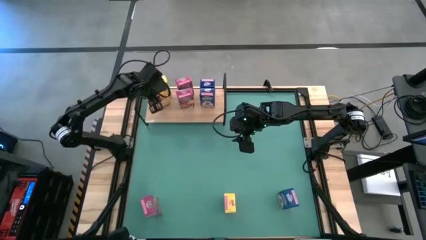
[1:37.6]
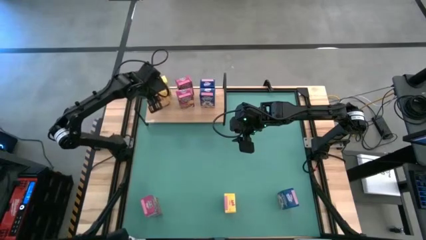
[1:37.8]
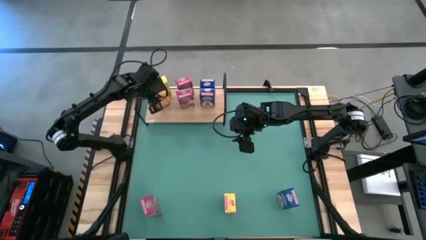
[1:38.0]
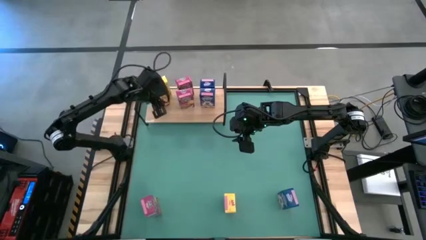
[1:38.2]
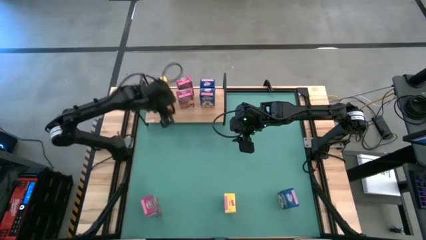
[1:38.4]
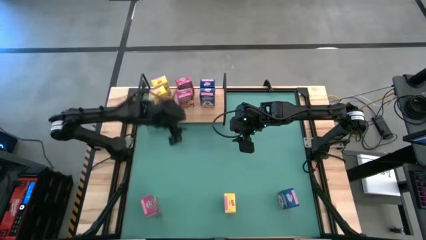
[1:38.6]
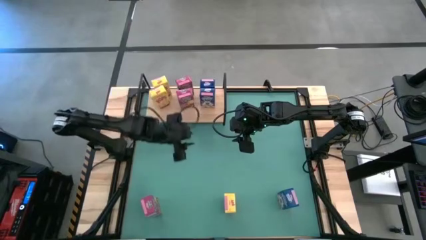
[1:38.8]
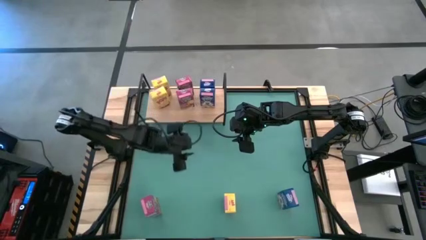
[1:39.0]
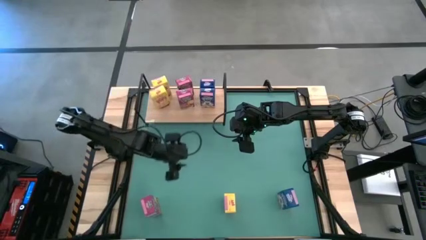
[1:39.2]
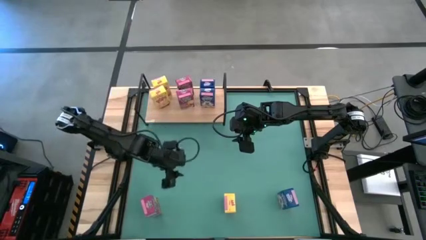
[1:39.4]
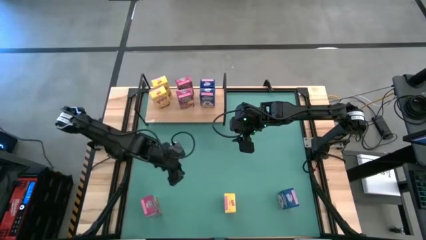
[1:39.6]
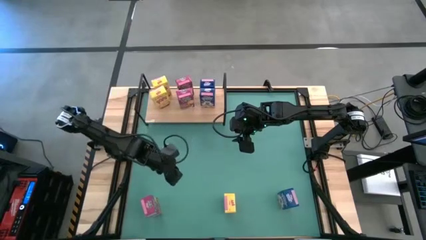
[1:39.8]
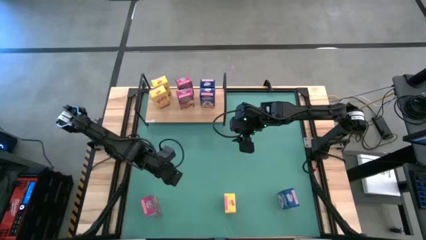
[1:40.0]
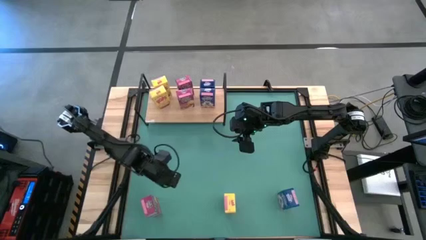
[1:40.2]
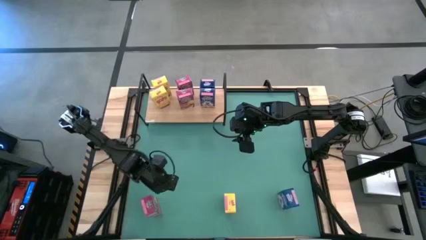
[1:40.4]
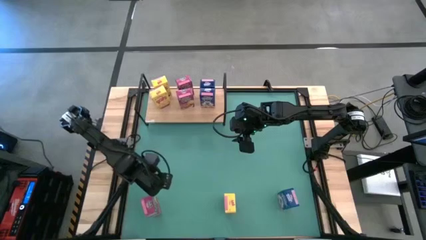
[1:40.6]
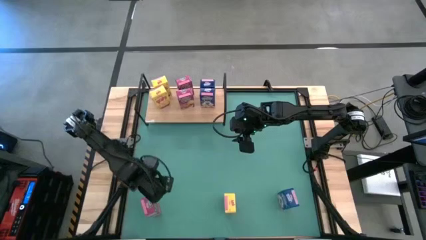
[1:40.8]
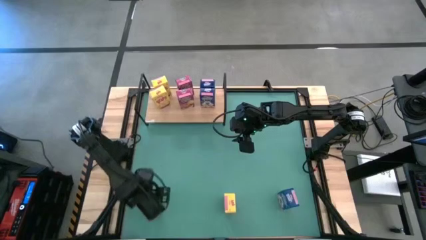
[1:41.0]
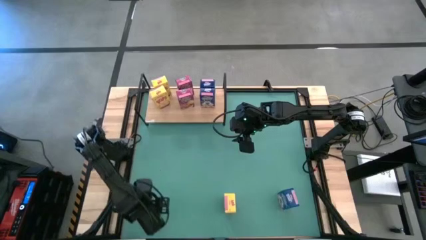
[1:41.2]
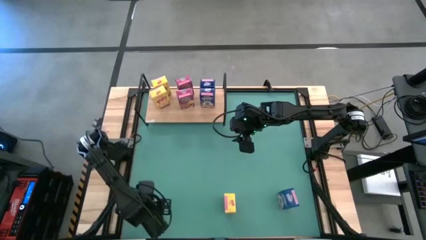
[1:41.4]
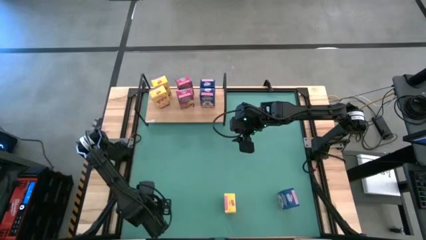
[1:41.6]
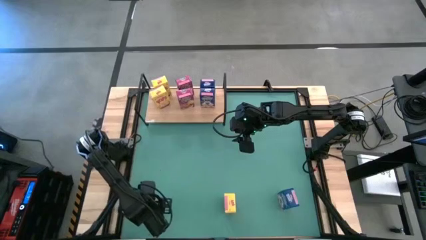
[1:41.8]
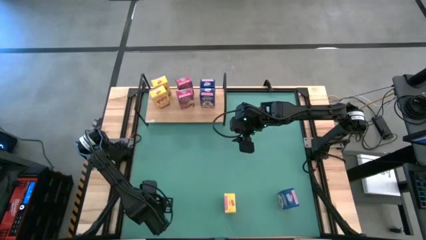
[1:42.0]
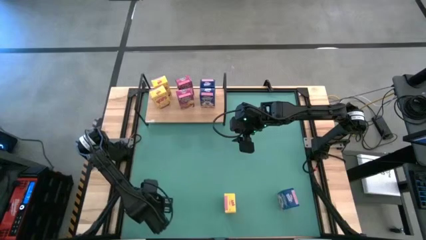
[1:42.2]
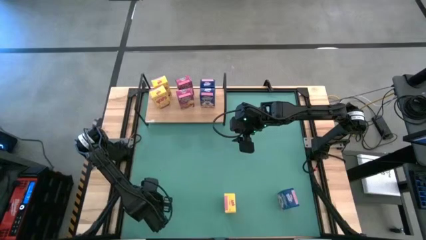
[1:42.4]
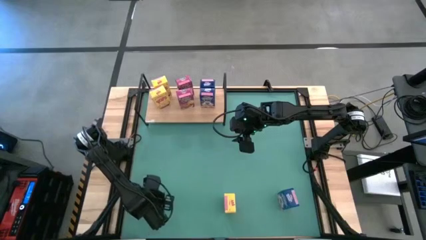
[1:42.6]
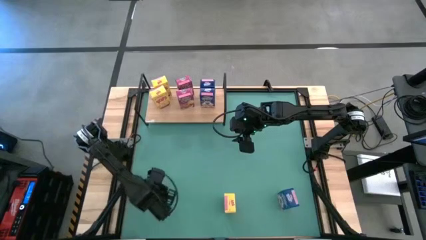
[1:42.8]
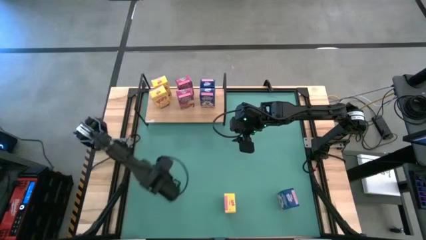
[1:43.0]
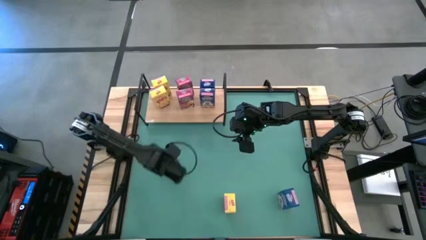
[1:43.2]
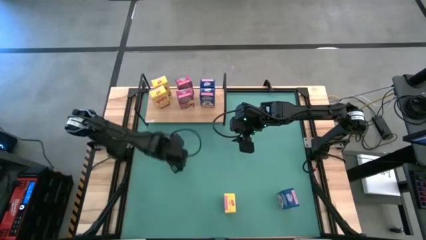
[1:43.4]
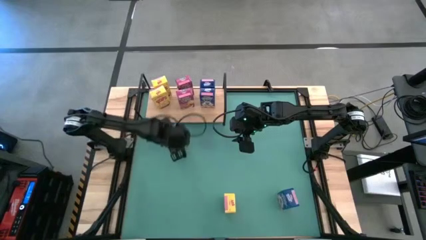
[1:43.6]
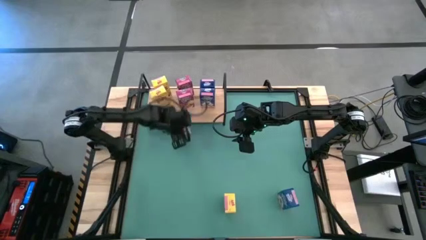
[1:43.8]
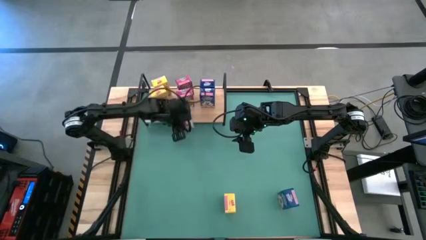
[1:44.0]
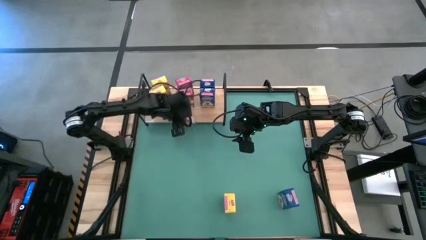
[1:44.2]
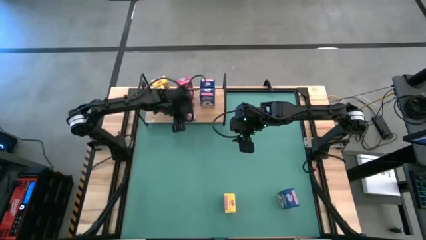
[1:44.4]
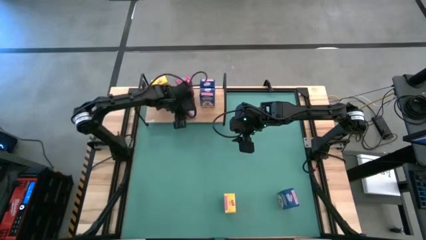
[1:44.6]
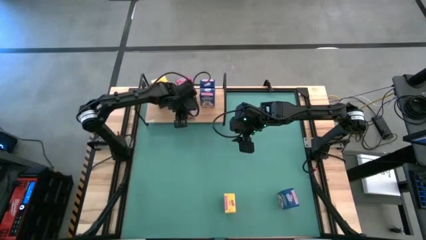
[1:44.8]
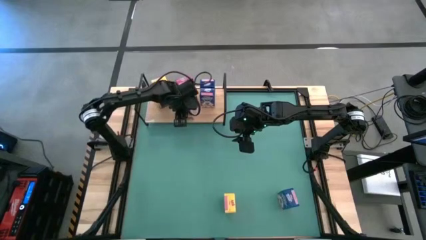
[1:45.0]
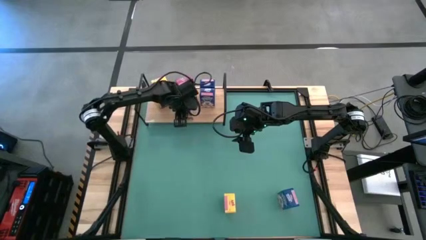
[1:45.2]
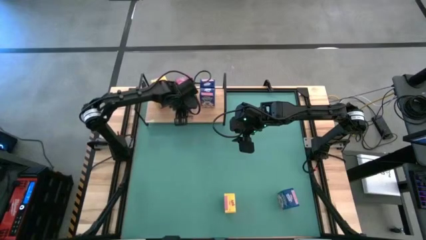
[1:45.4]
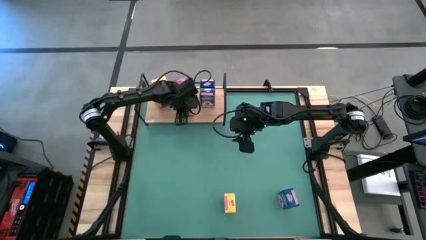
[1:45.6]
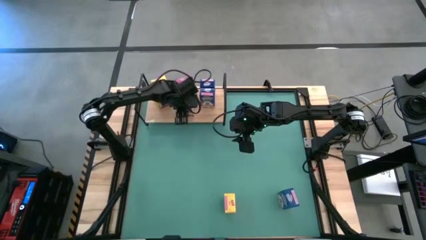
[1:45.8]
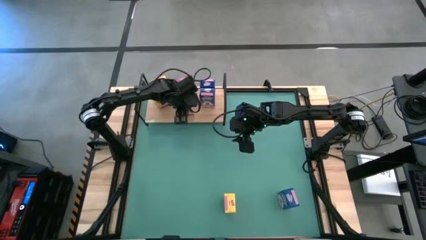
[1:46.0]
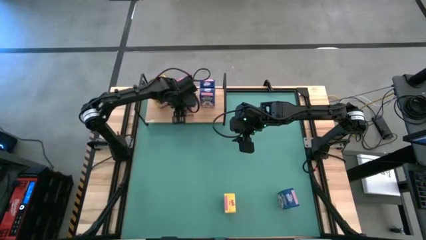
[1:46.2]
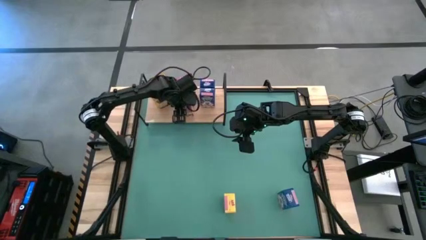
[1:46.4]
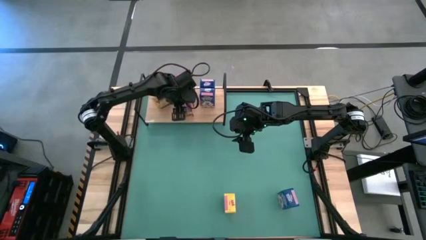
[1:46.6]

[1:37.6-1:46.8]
Task: Stack cereal on shelf
Put the pink cereal box on the shelf aligned with the other pink cereal boxes

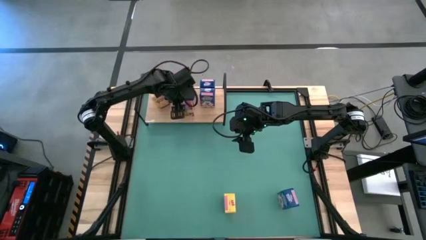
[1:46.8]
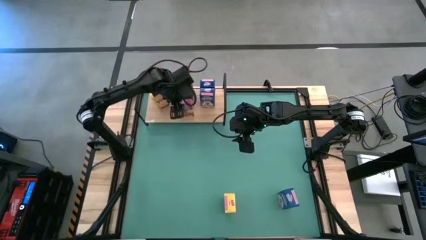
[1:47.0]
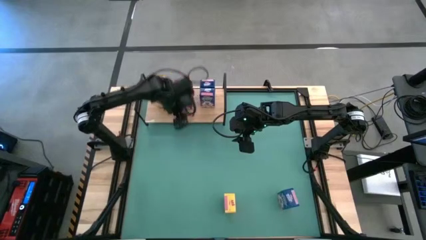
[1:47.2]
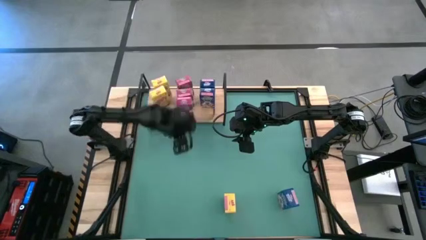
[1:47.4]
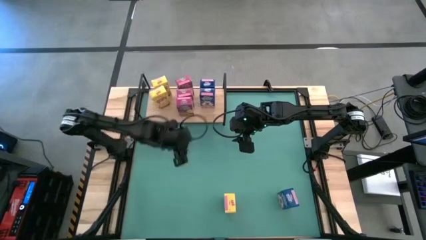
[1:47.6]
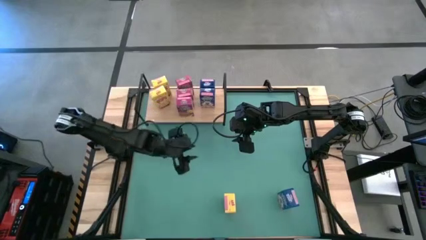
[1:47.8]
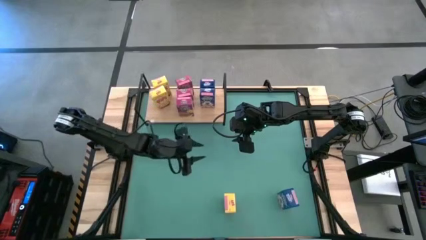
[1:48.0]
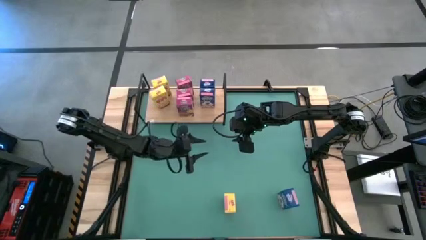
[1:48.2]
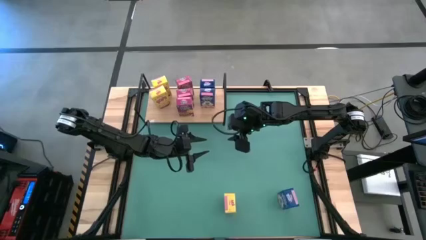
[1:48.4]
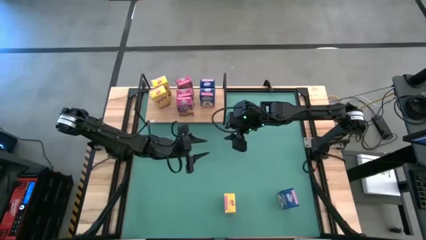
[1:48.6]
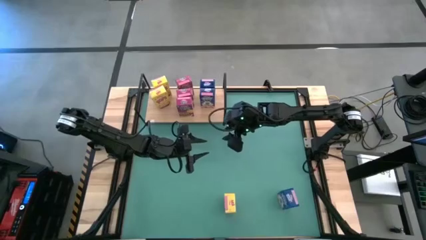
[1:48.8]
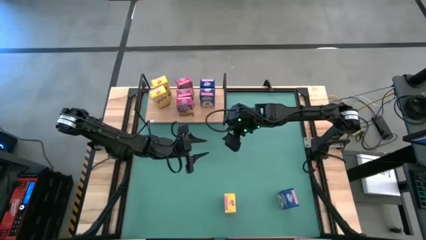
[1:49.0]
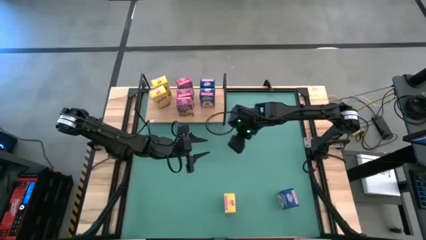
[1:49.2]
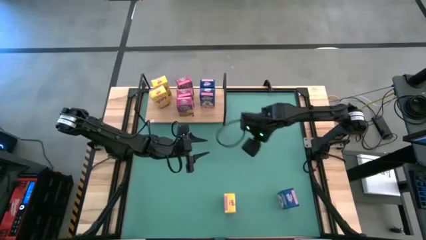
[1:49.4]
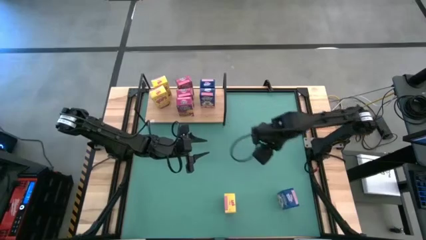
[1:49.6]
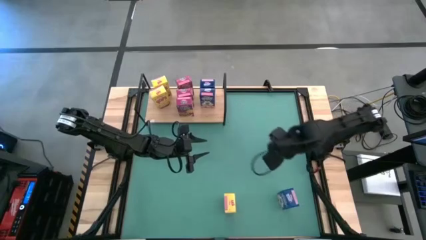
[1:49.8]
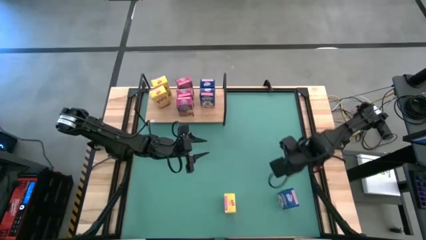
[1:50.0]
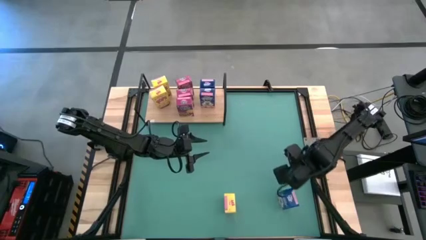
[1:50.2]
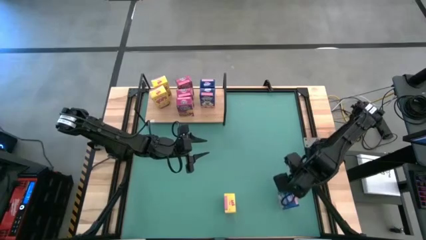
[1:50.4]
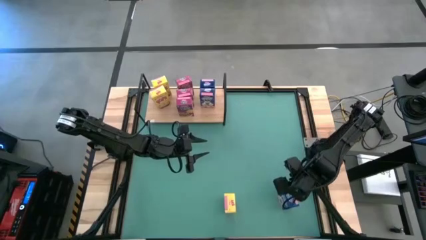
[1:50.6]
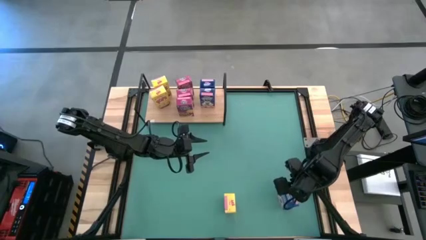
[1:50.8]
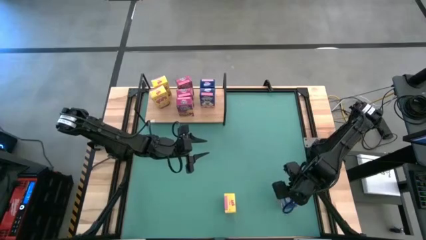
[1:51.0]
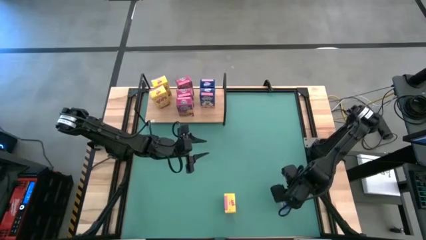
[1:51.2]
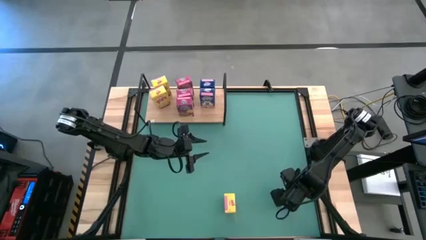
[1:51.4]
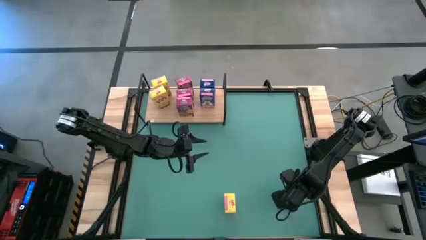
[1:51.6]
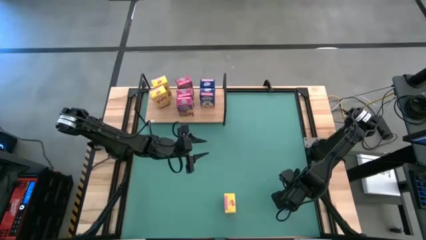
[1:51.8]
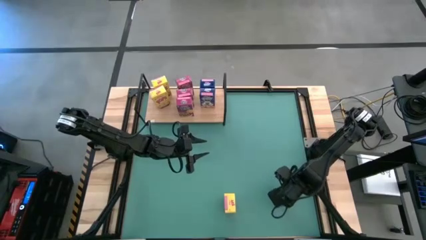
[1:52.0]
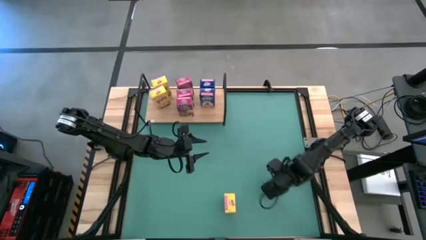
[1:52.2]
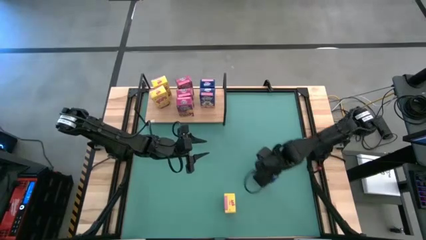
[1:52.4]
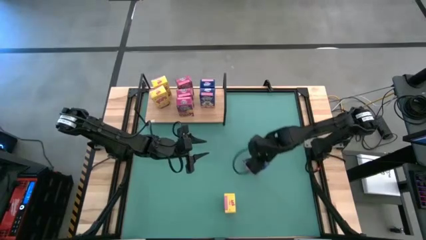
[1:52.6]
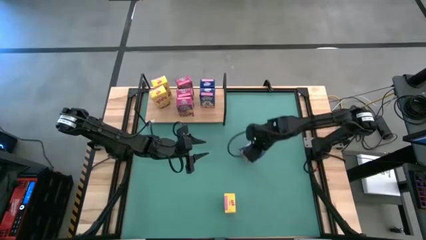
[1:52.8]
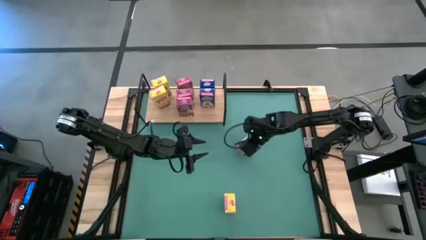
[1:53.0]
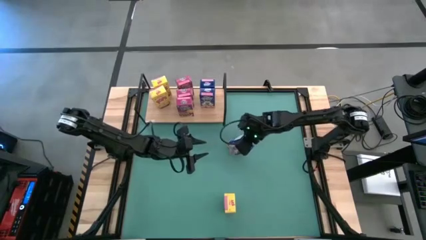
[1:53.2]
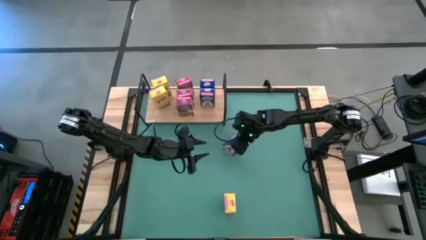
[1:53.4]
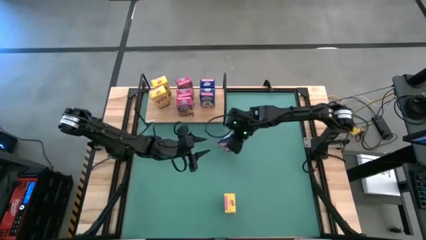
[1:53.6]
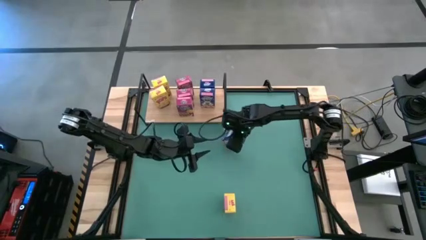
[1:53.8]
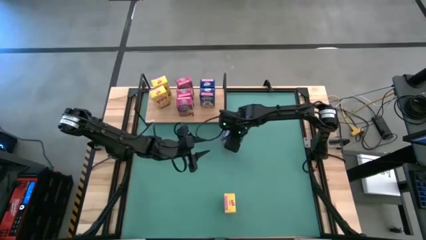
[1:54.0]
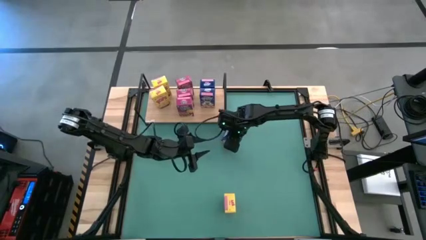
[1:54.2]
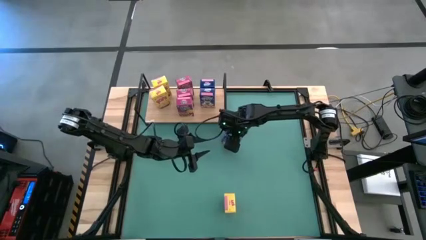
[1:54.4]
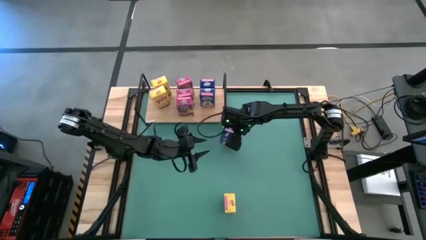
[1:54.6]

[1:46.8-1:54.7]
Move the blue cereal box to the center of the table
